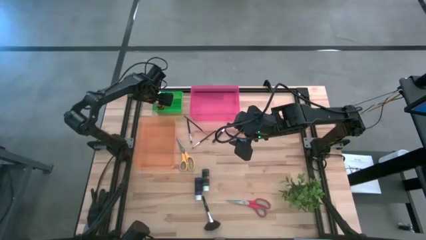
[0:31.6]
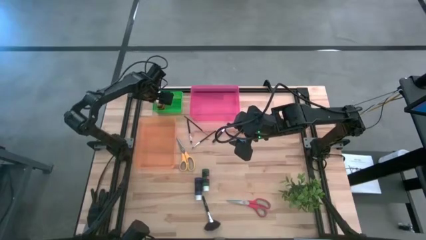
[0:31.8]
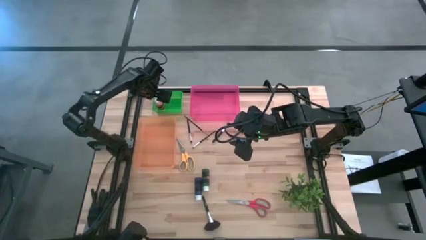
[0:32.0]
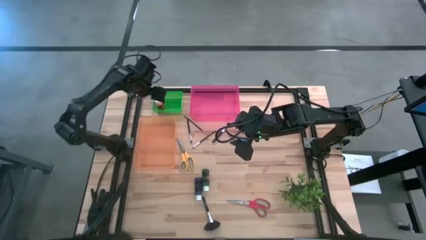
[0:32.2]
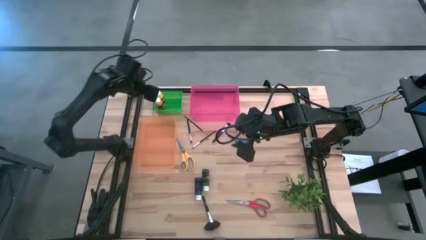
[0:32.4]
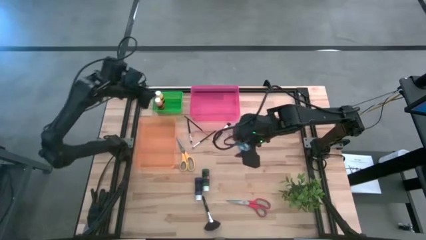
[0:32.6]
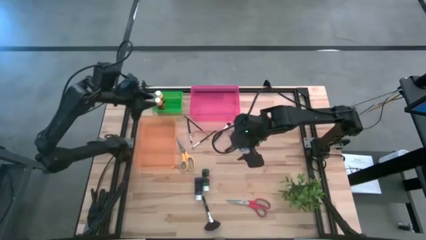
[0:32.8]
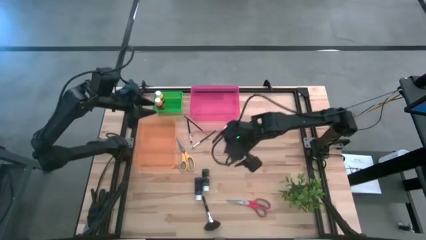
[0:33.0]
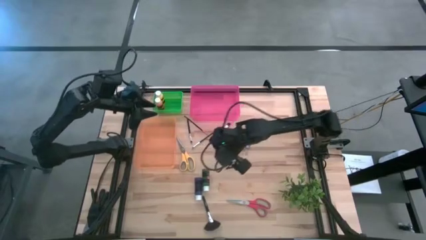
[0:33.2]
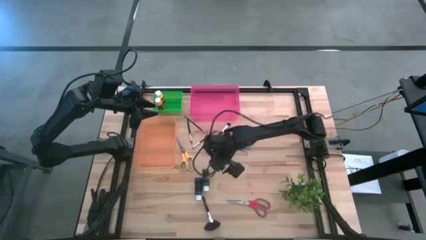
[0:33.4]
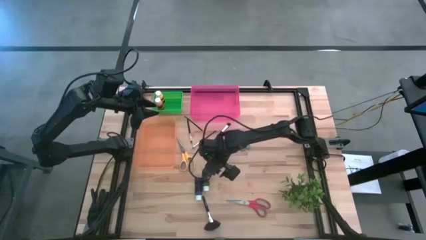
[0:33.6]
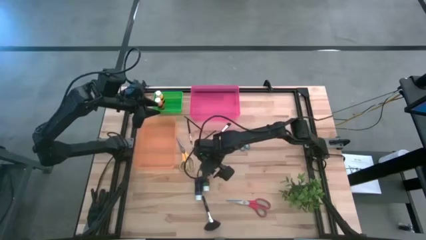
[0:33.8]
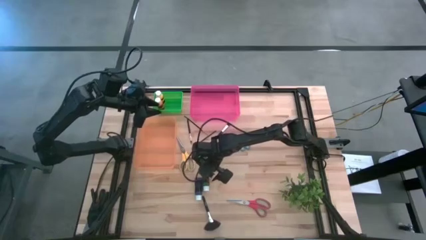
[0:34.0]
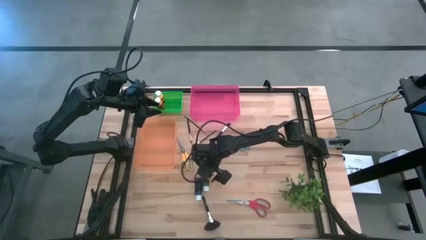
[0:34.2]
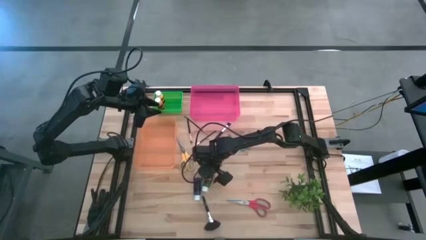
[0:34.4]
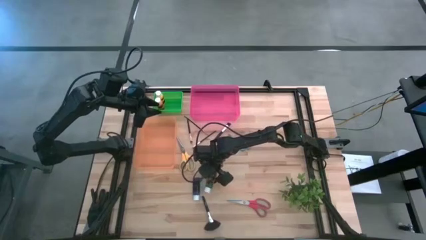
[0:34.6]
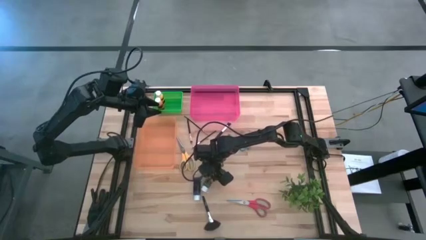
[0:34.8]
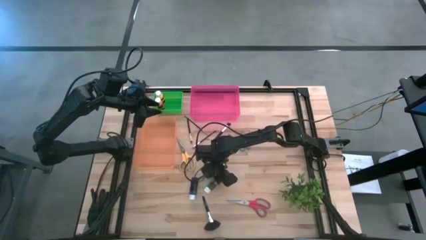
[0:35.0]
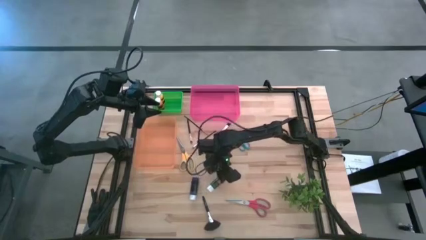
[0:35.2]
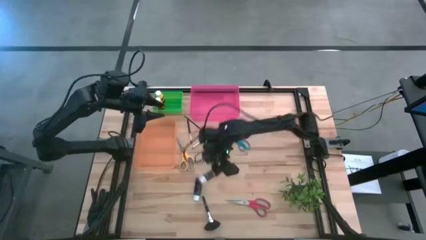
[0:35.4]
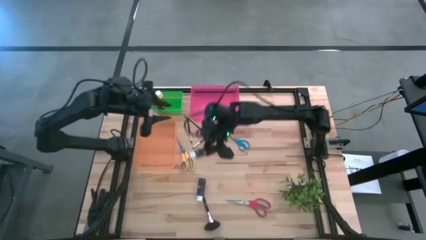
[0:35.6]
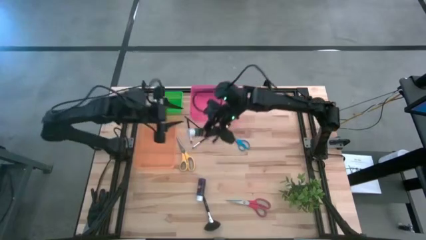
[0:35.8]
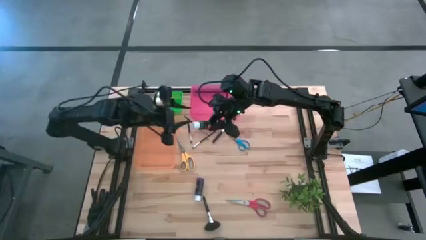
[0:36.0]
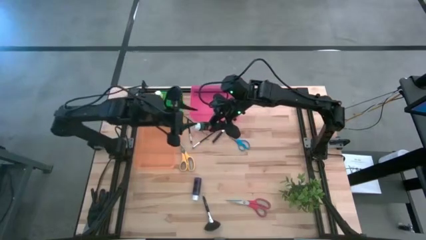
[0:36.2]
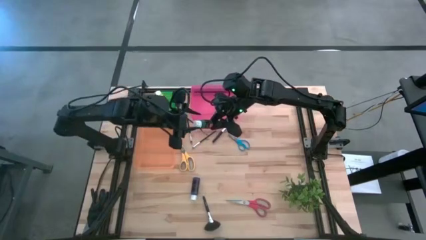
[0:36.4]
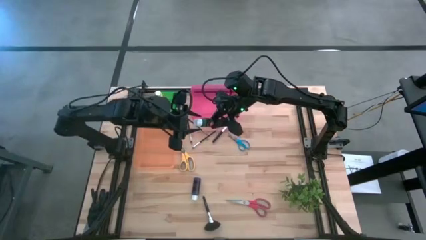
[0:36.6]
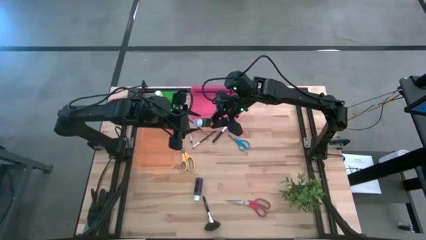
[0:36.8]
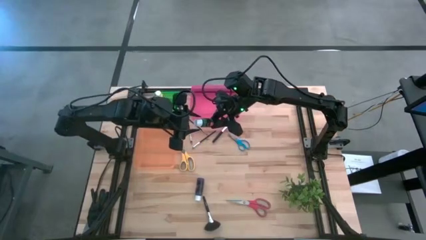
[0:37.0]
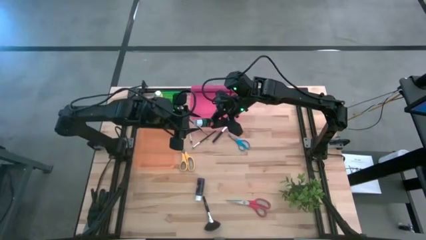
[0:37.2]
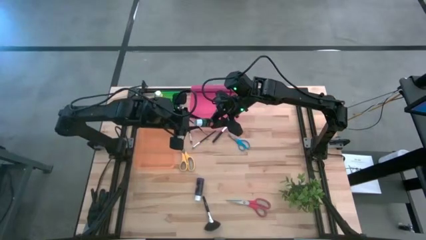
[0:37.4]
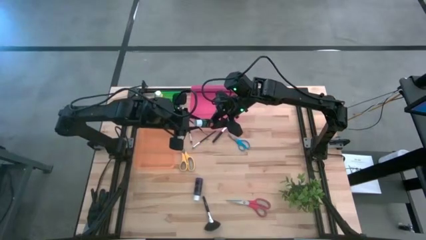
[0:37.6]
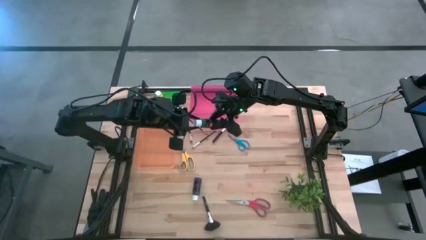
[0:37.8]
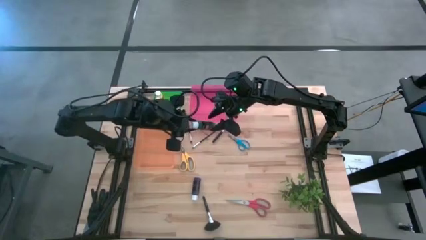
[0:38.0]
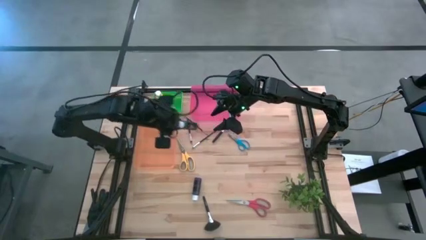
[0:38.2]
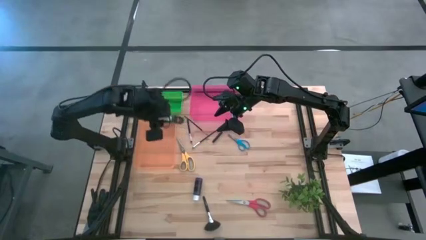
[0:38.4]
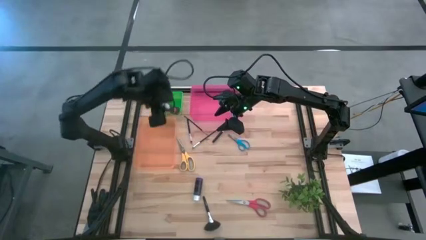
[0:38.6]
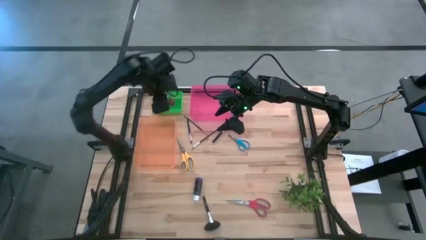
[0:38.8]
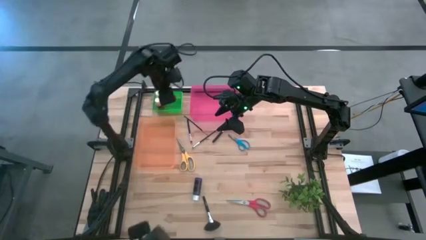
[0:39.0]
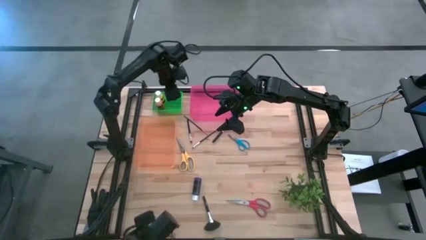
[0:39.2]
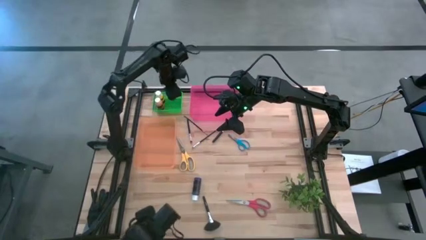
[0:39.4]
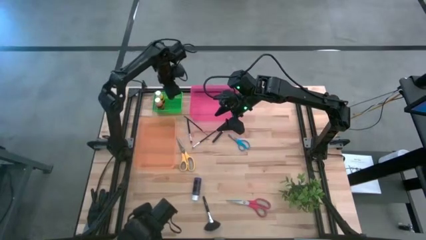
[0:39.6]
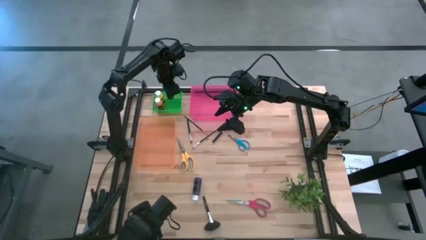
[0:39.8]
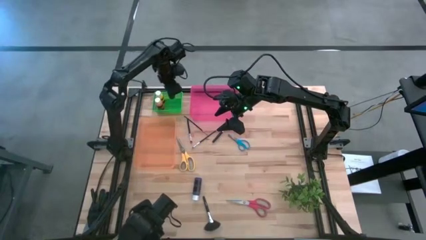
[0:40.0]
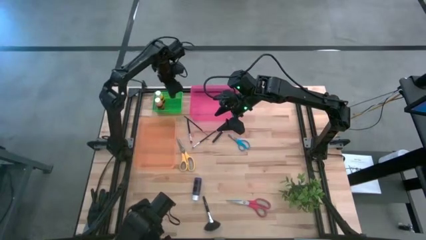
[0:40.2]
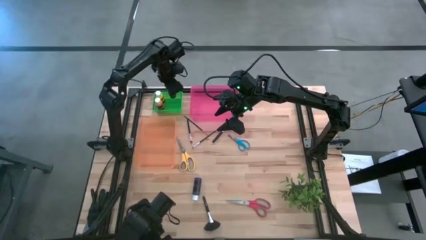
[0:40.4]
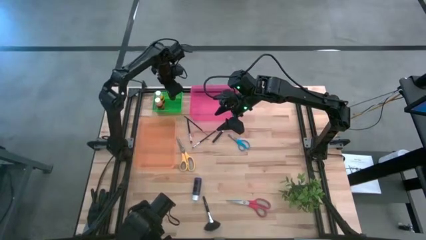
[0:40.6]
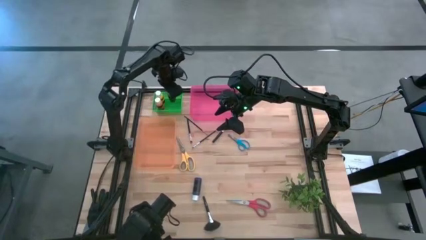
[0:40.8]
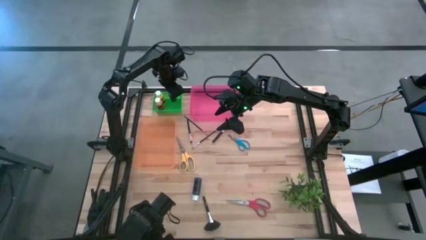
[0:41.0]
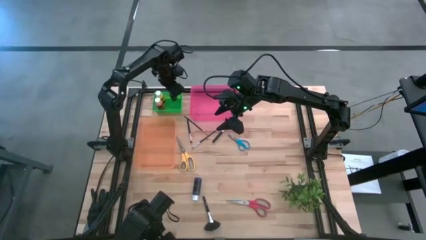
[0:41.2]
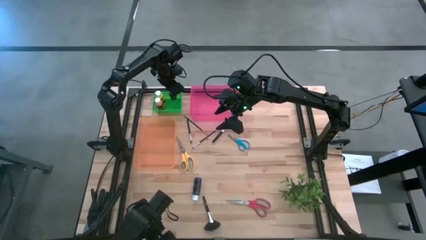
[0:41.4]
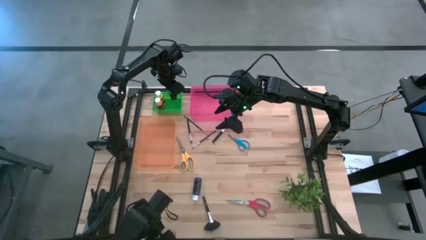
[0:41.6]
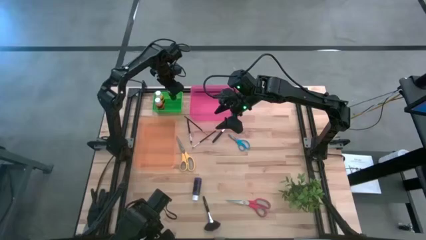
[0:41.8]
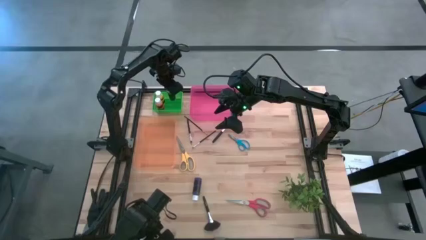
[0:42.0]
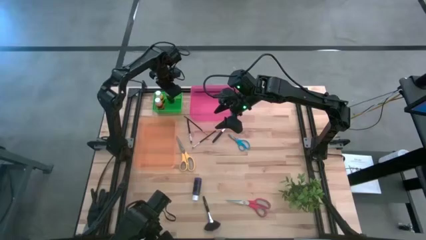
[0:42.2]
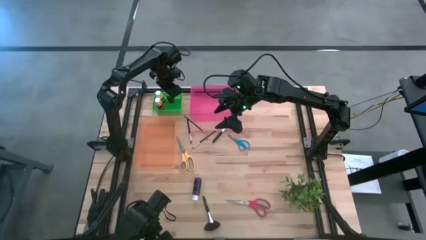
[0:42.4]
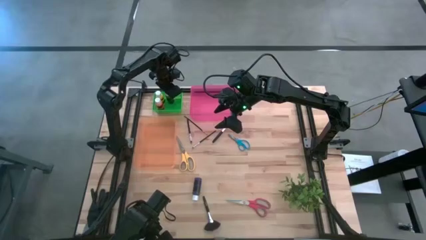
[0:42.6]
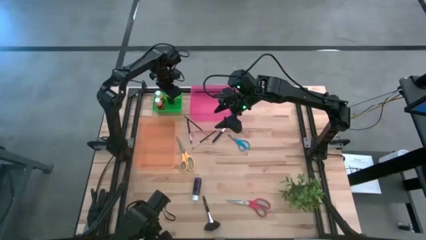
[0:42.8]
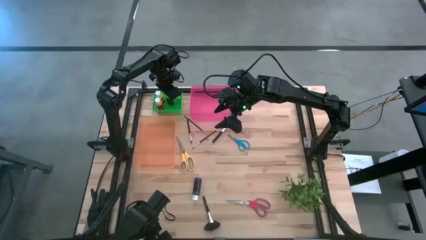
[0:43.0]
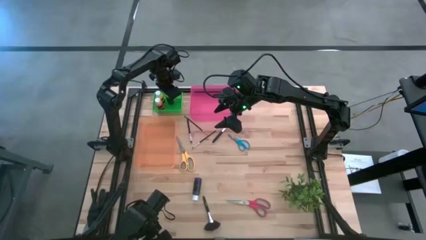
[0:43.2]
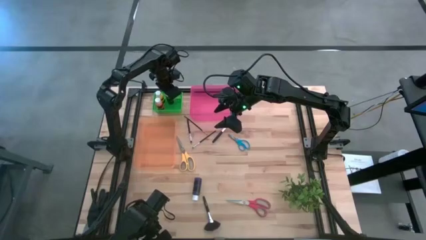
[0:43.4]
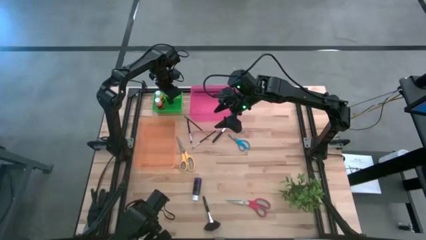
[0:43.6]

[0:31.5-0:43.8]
Task: Pick & Place Paint Supplies
Put the green paint bottle into the green bin
